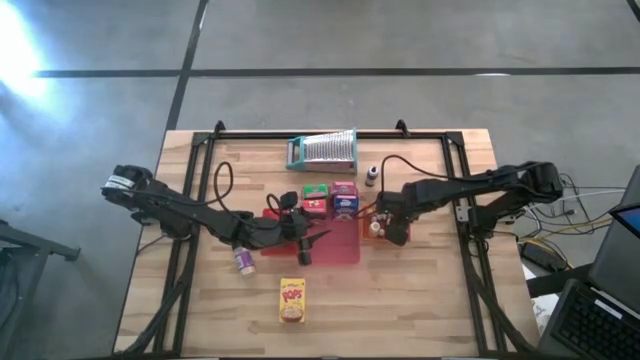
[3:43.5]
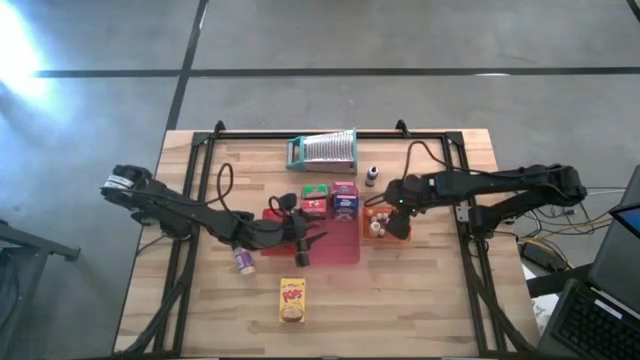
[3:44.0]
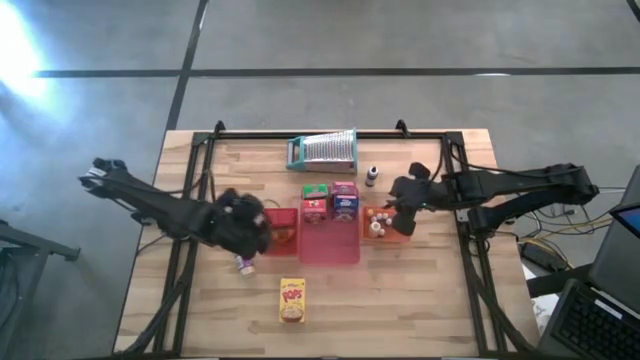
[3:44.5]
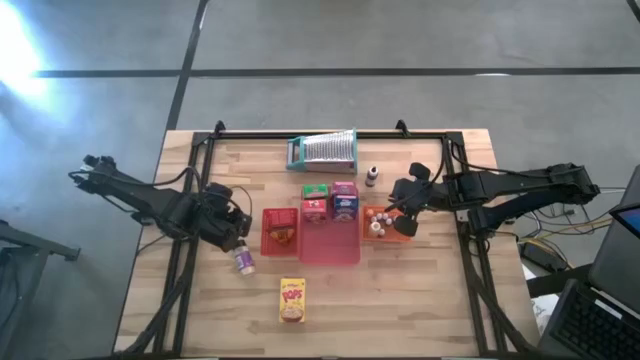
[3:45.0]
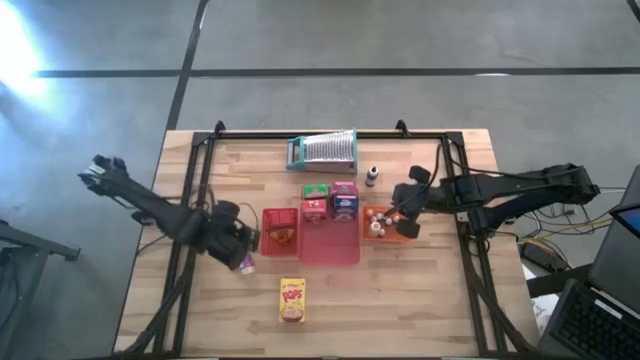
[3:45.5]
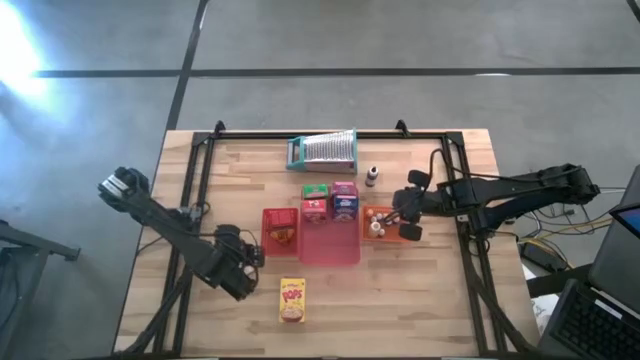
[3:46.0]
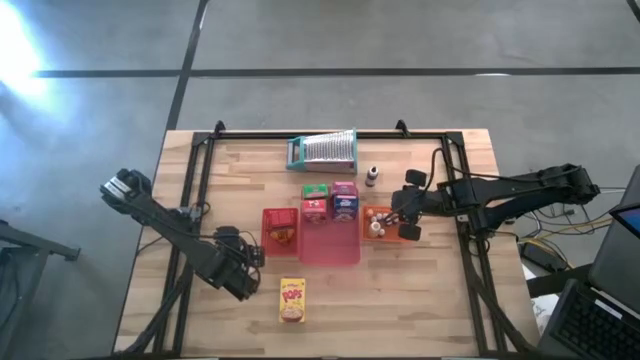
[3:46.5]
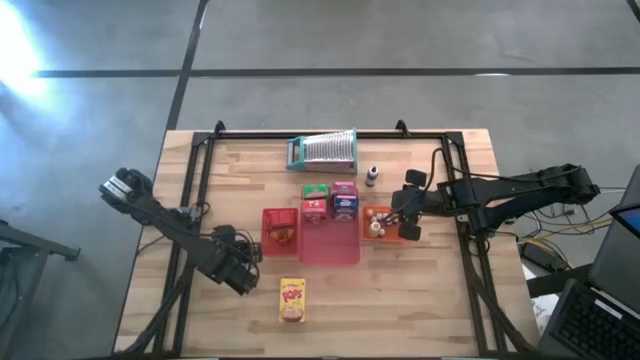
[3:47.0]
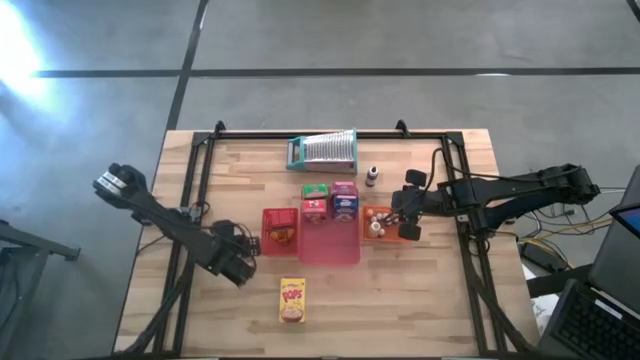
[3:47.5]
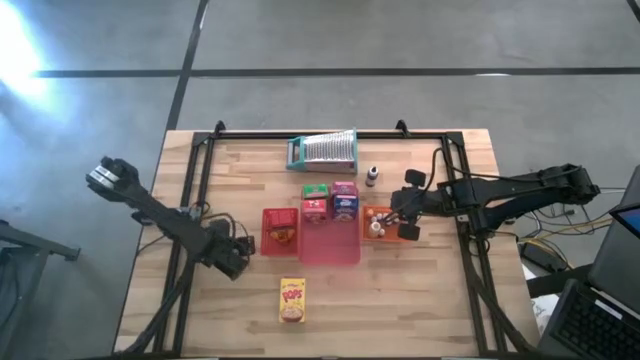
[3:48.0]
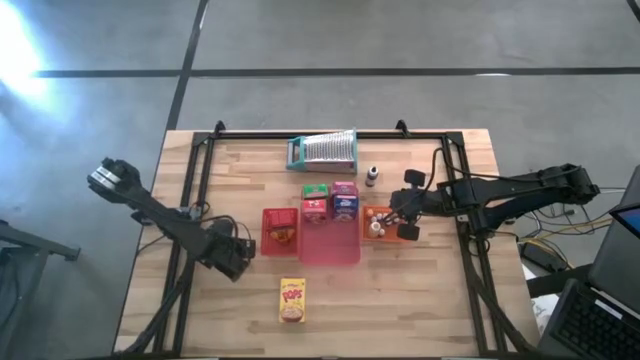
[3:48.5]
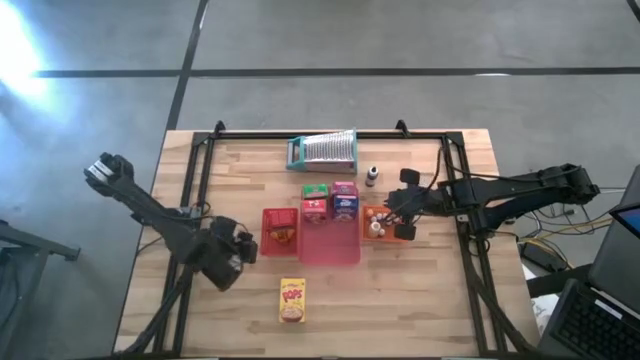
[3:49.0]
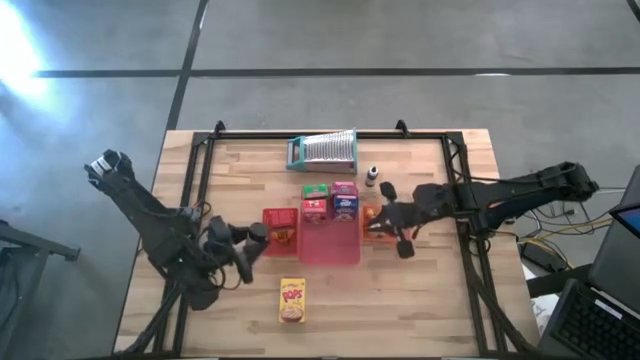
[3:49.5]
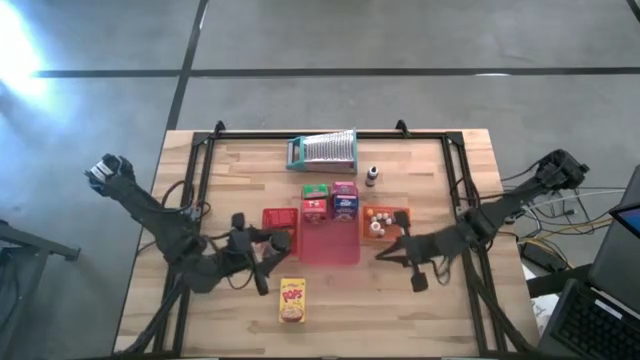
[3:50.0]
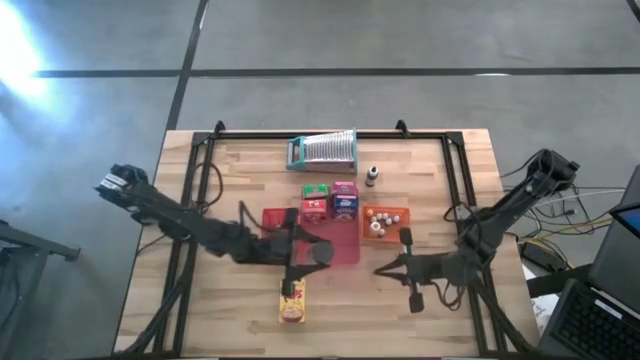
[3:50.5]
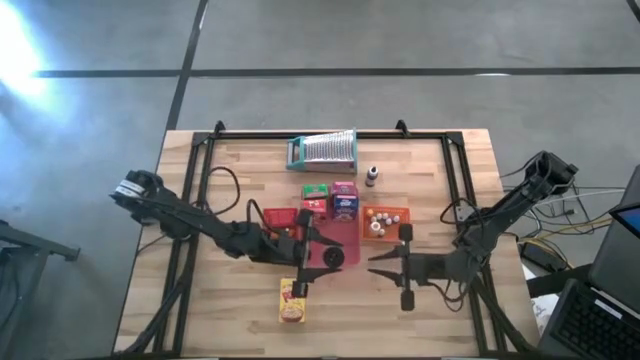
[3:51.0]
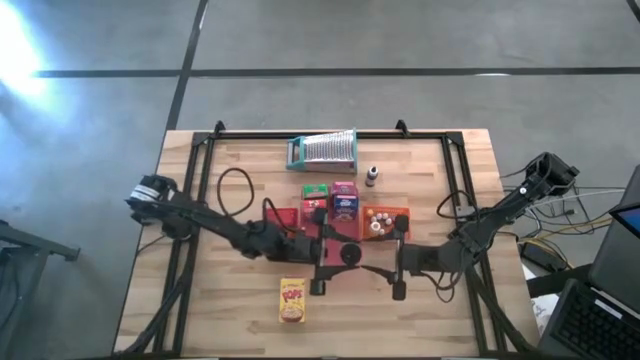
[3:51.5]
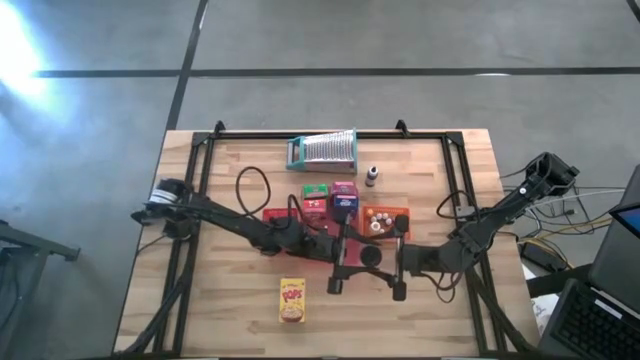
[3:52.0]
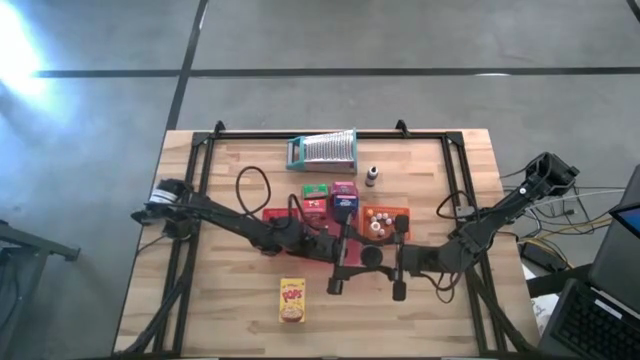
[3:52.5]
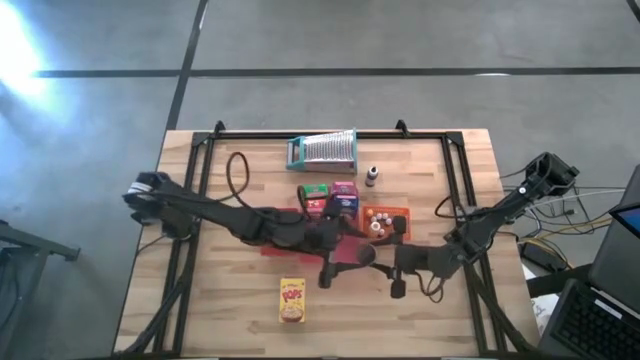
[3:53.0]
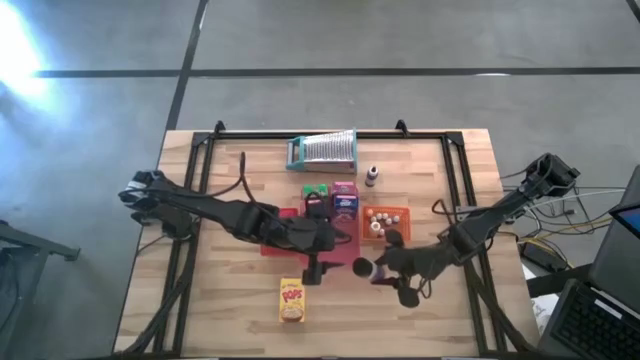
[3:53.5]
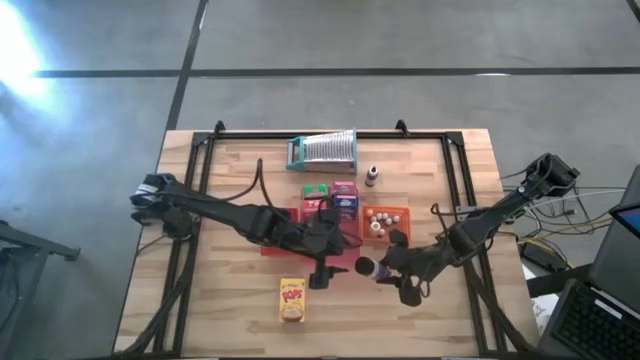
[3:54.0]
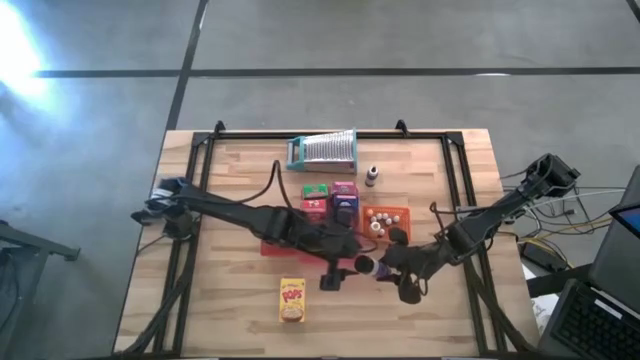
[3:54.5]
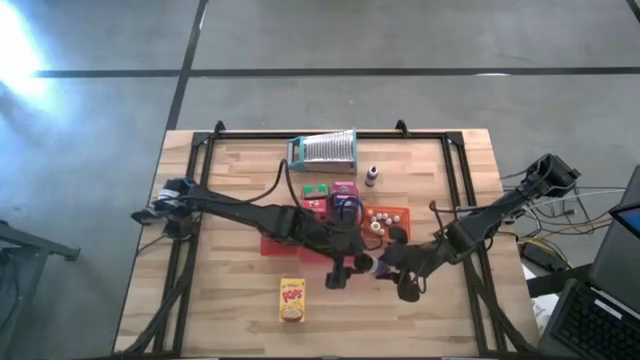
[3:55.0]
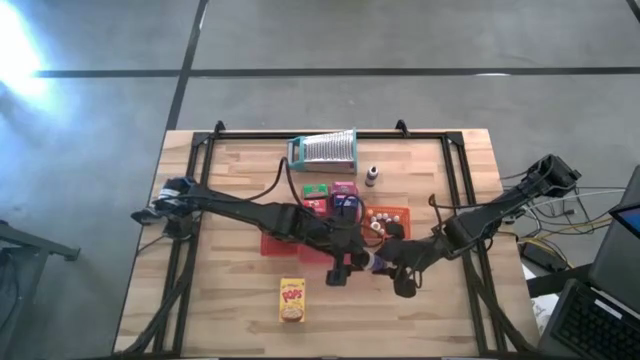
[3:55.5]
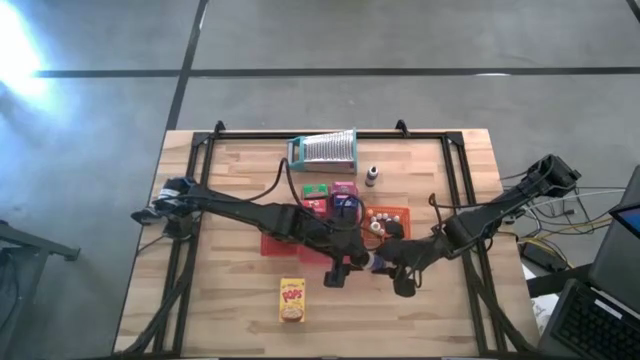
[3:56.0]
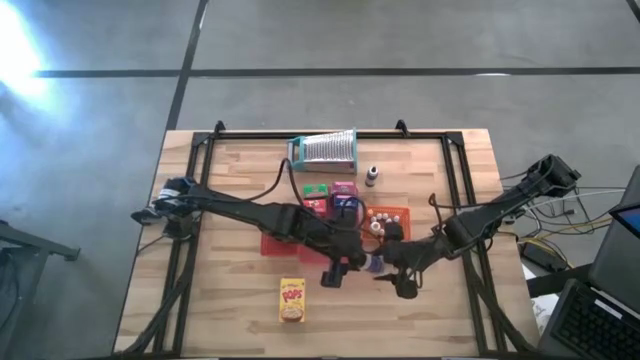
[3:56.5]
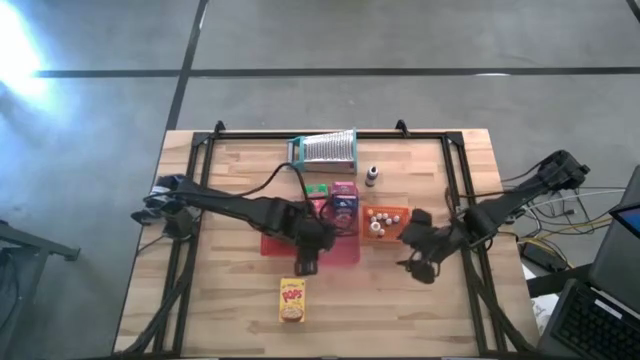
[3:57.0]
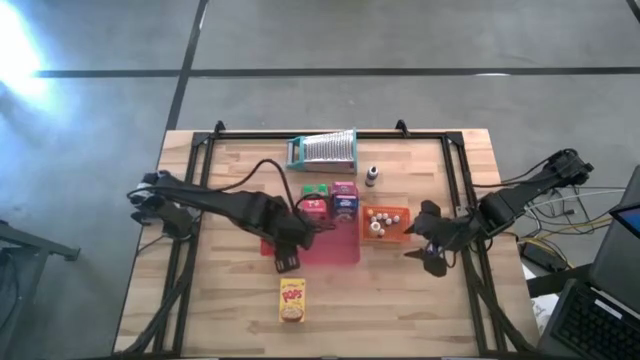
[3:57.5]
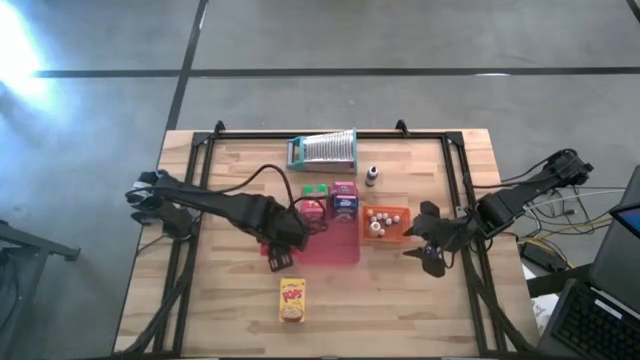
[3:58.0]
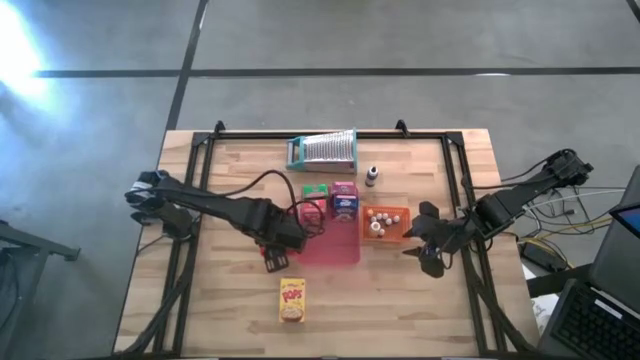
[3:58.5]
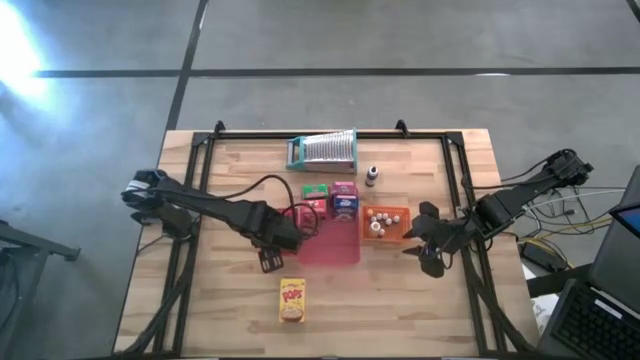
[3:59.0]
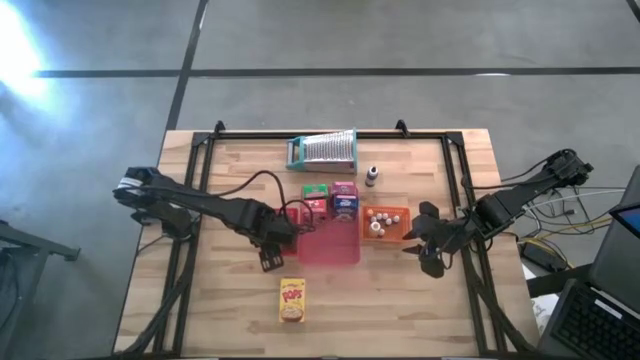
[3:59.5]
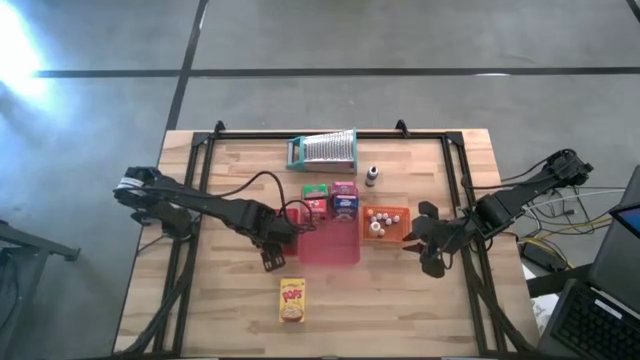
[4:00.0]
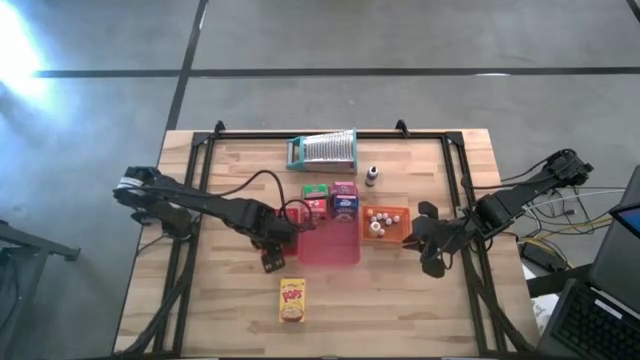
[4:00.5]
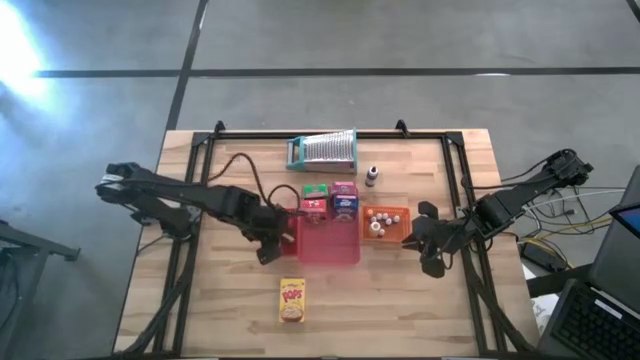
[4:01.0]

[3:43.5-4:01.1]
Task: Pick & Place Kitchen Items
Put the black spice bottle into the red bin

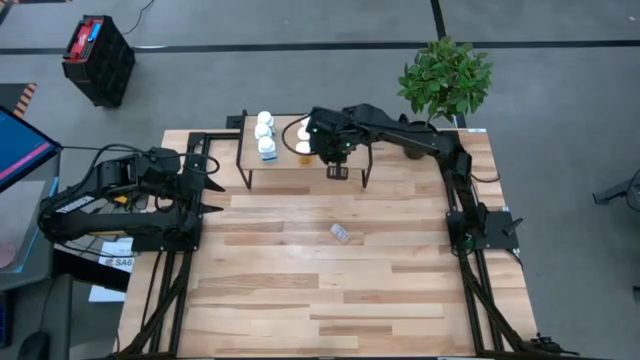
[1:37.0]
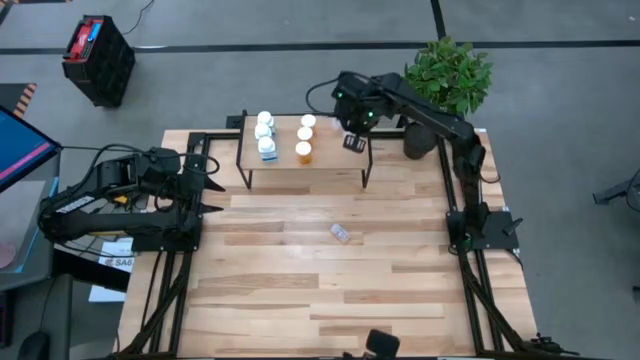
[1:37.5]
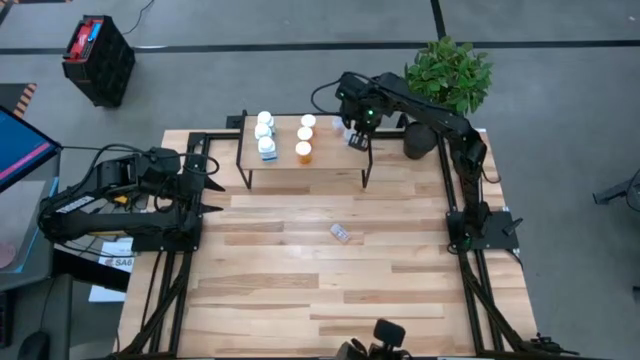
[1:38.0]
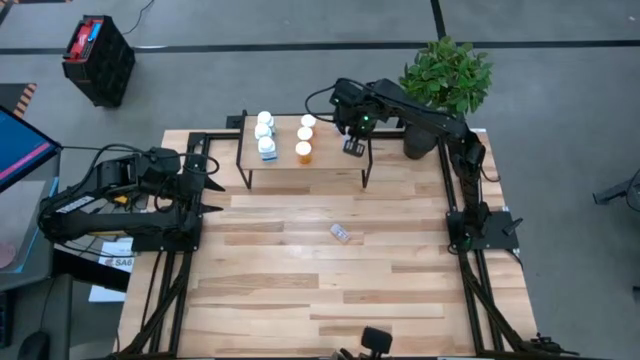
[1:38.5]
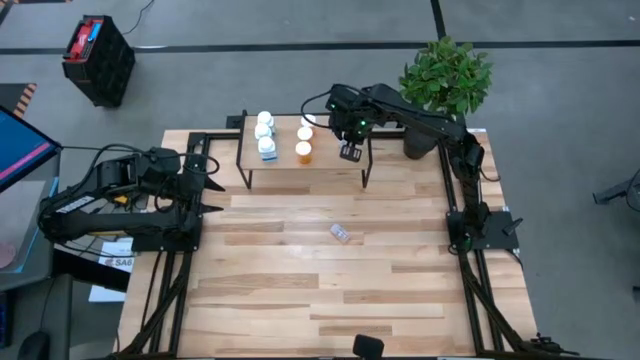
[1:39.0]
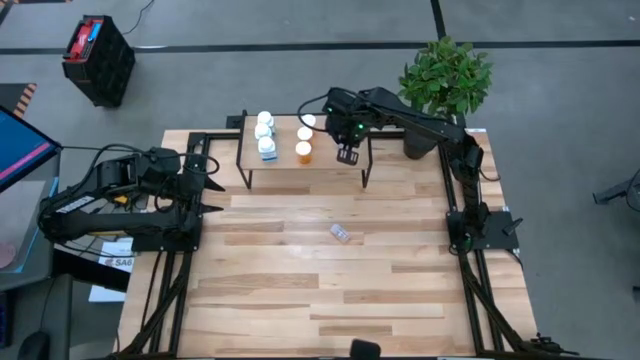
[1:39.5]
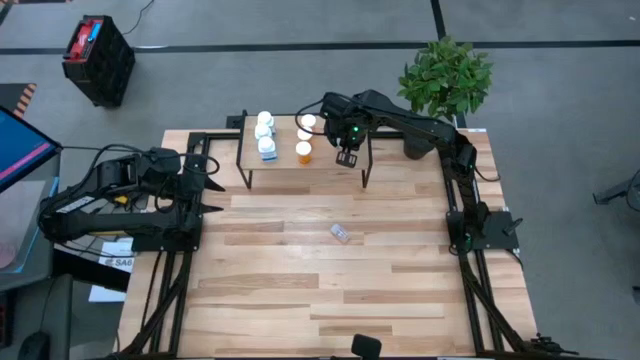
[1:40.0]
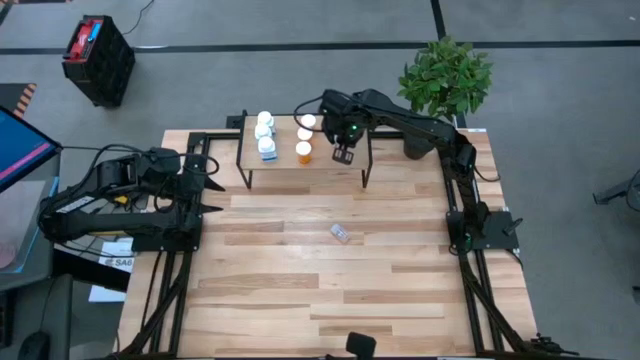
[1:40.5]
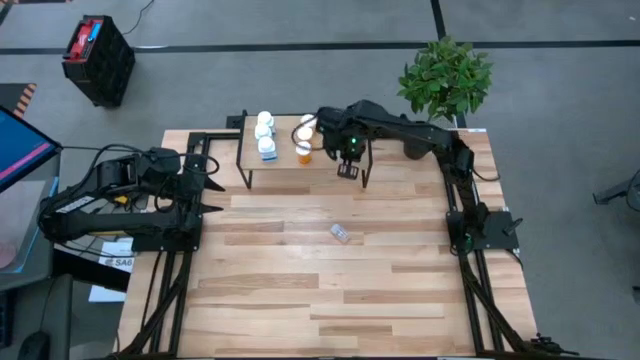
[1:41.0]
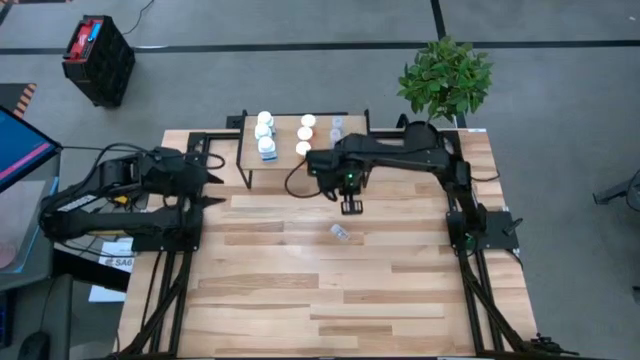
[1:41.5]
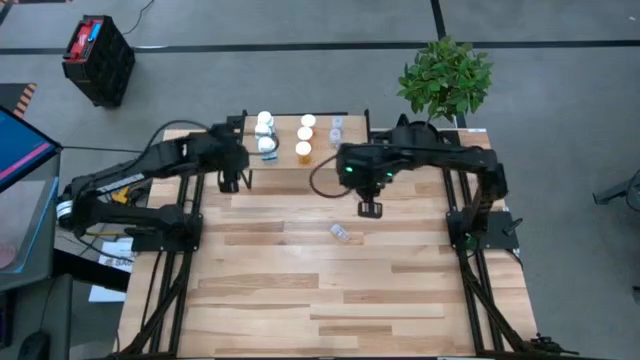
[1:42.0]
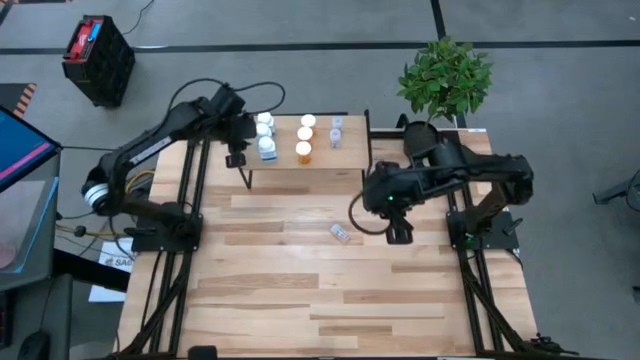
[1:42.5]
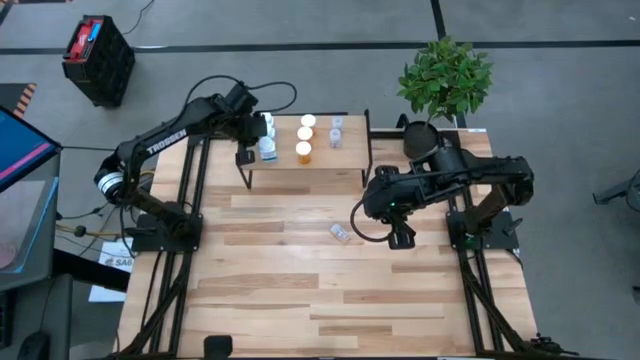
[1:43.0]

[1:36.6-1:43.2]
Task: Pick and place medicine bottles onto shelf by color
Adjust the pill bottles on the shelf
